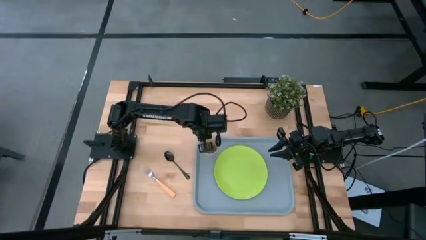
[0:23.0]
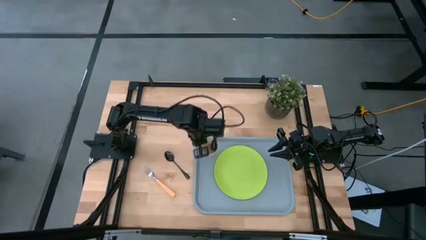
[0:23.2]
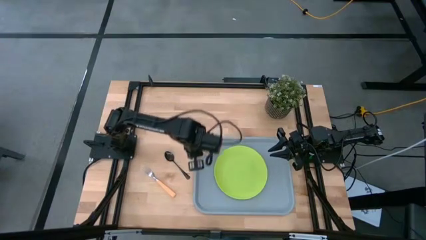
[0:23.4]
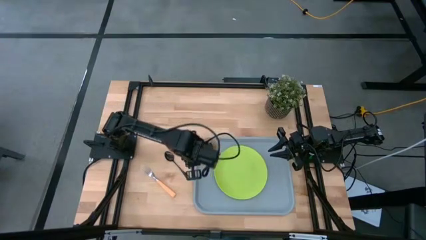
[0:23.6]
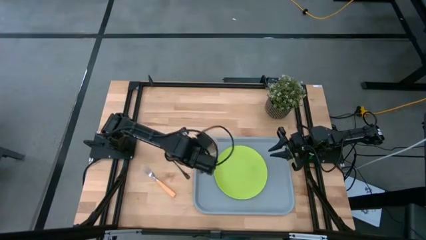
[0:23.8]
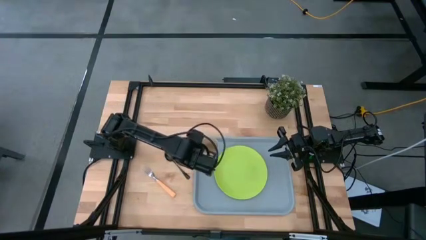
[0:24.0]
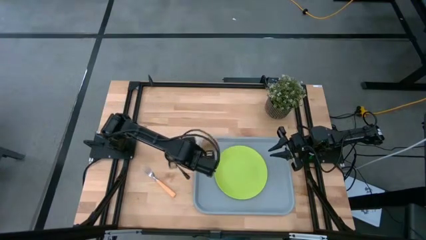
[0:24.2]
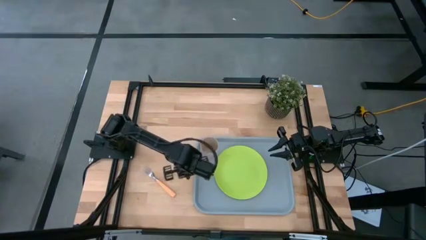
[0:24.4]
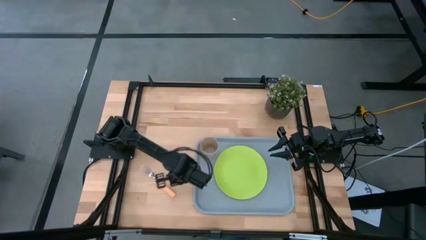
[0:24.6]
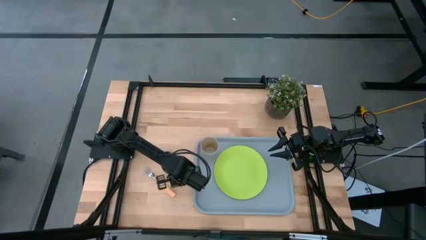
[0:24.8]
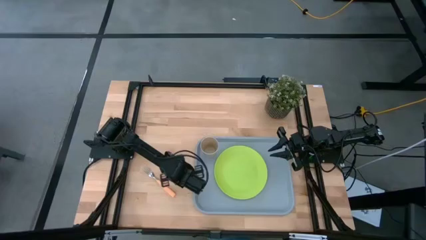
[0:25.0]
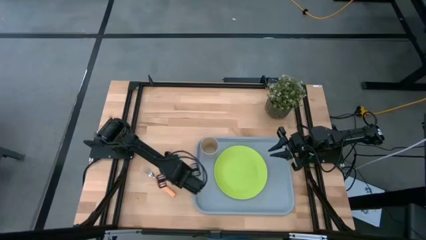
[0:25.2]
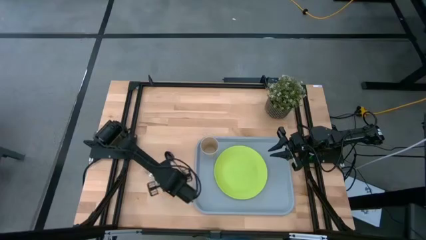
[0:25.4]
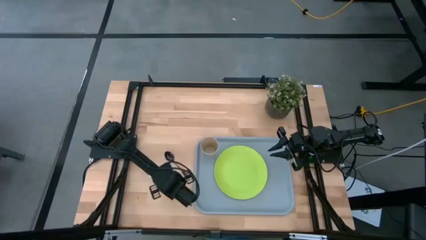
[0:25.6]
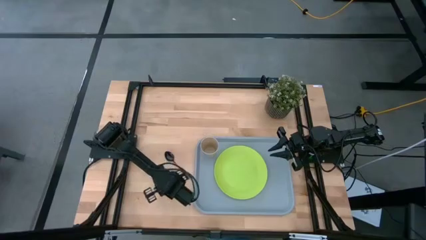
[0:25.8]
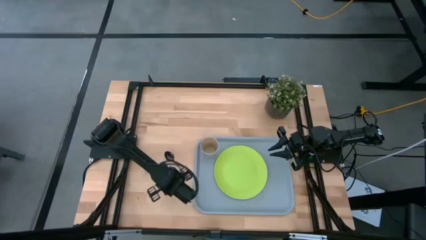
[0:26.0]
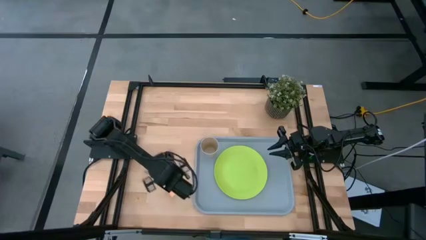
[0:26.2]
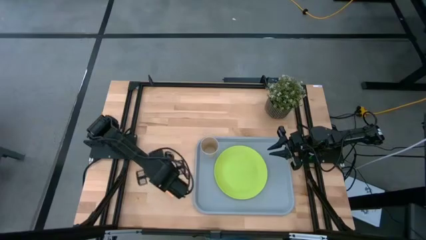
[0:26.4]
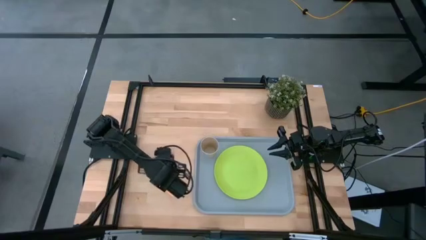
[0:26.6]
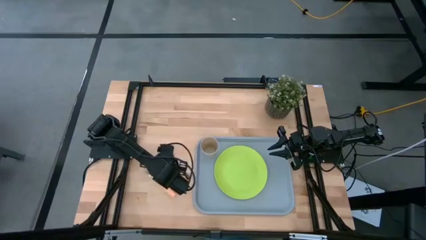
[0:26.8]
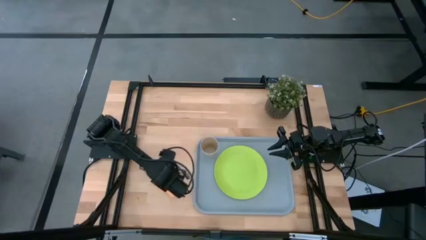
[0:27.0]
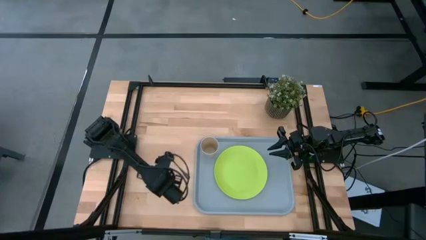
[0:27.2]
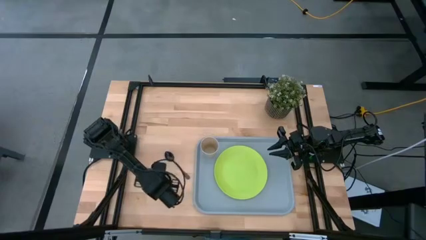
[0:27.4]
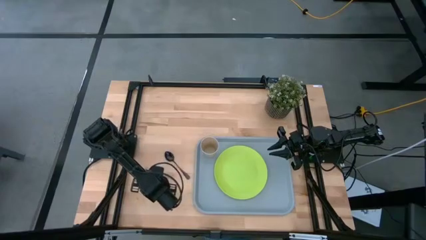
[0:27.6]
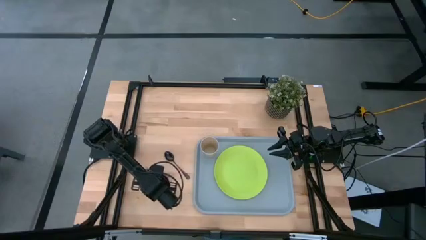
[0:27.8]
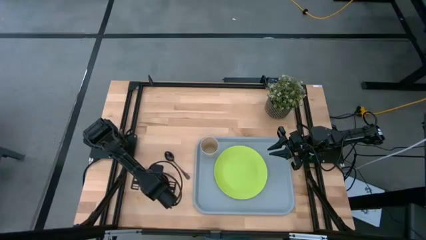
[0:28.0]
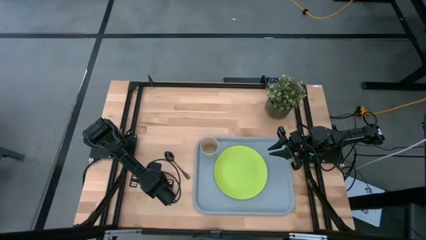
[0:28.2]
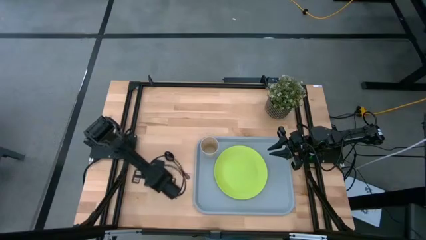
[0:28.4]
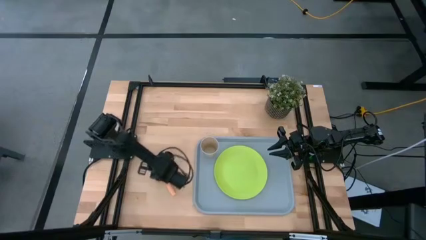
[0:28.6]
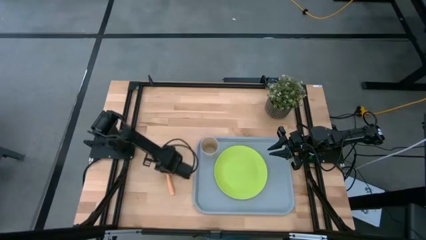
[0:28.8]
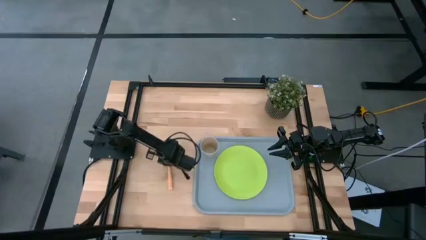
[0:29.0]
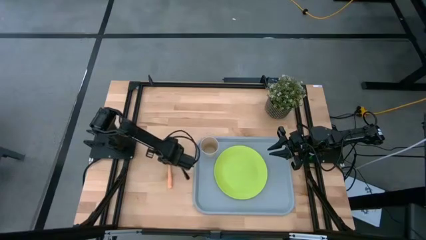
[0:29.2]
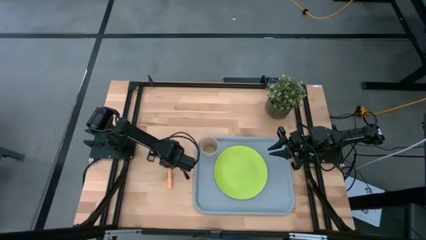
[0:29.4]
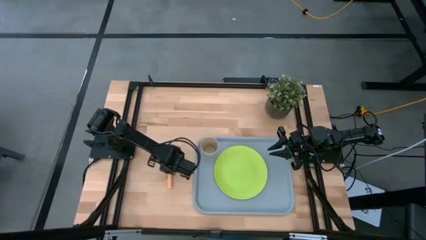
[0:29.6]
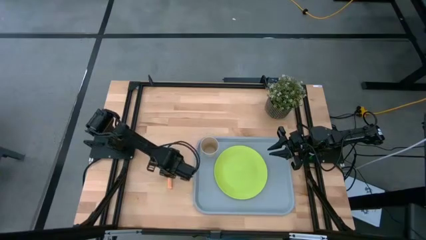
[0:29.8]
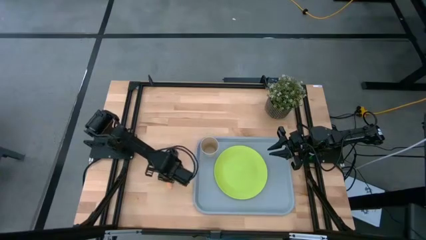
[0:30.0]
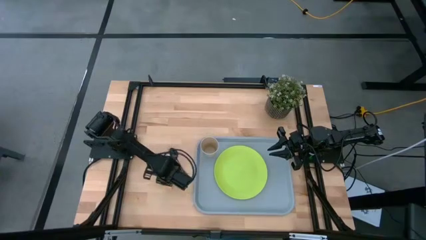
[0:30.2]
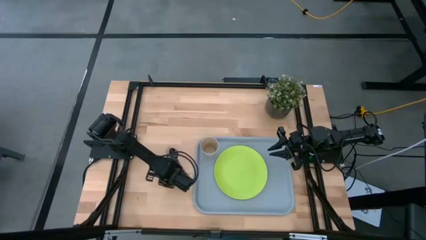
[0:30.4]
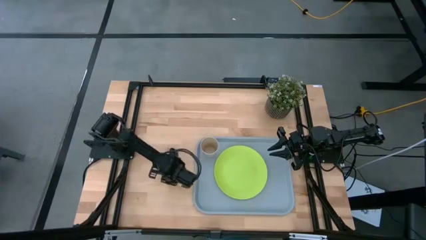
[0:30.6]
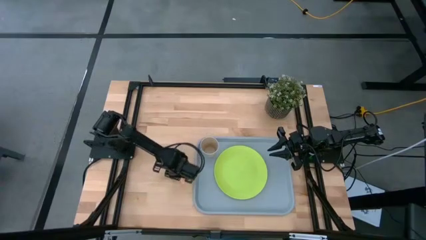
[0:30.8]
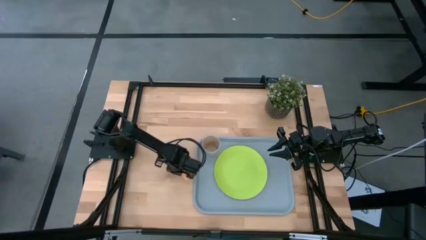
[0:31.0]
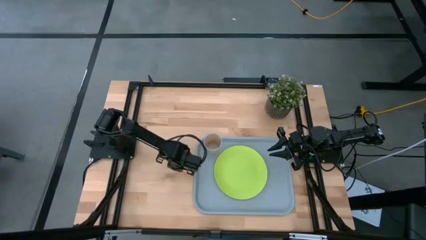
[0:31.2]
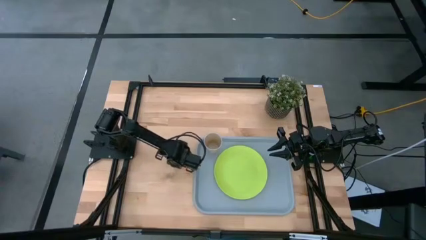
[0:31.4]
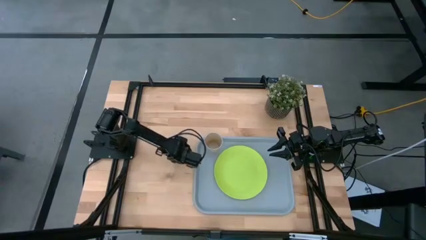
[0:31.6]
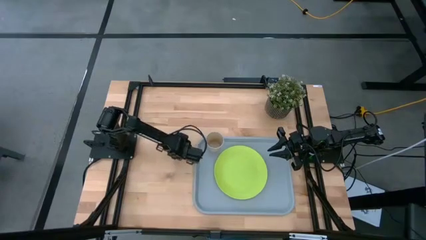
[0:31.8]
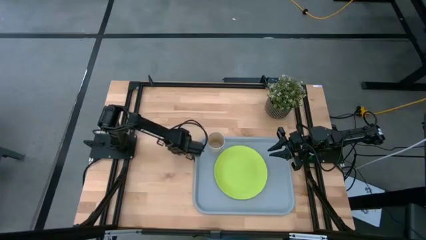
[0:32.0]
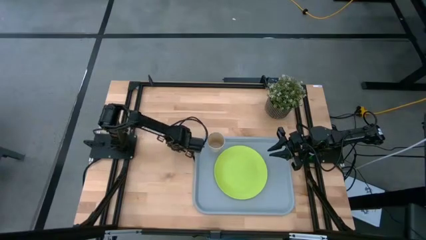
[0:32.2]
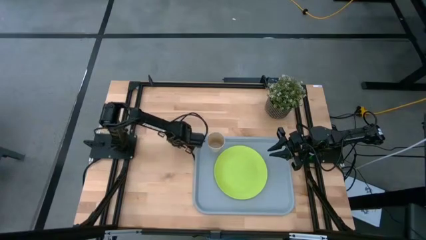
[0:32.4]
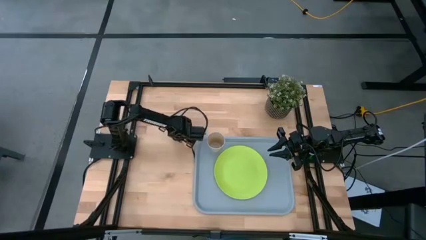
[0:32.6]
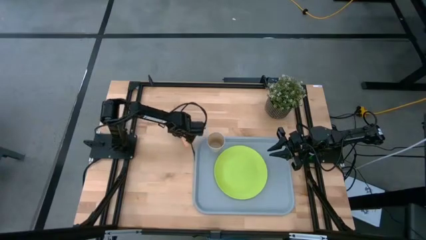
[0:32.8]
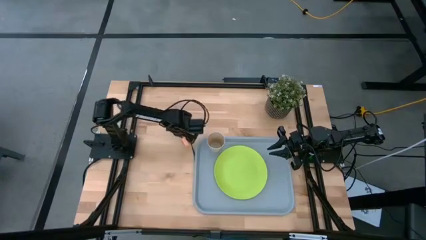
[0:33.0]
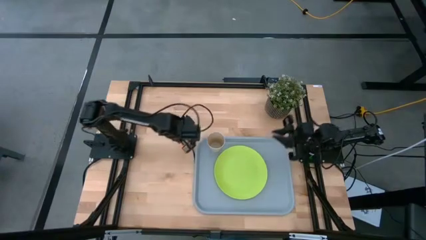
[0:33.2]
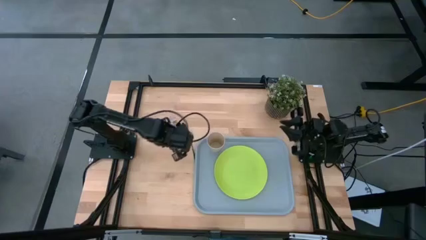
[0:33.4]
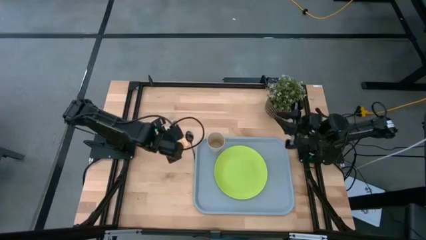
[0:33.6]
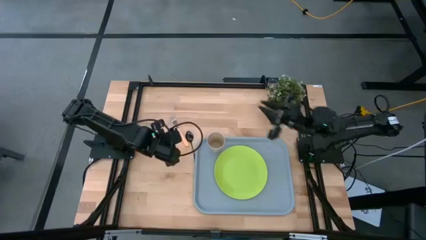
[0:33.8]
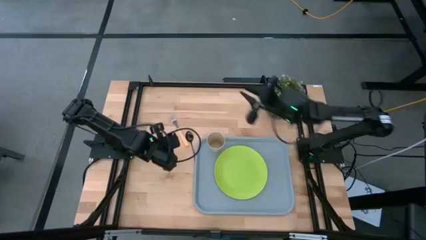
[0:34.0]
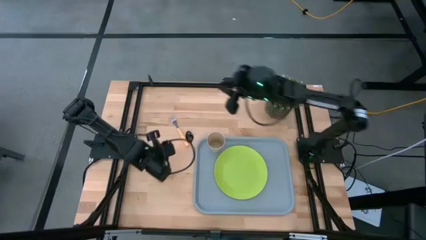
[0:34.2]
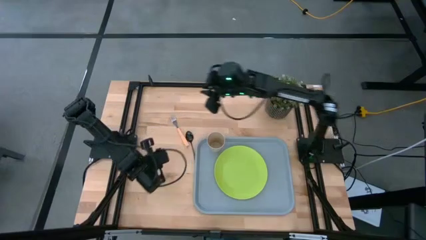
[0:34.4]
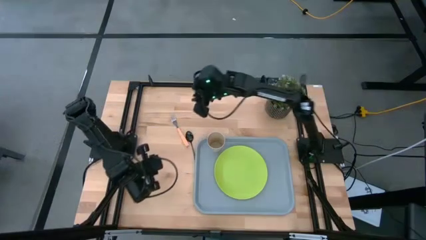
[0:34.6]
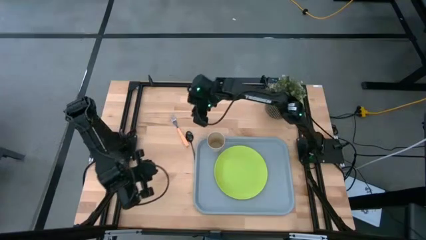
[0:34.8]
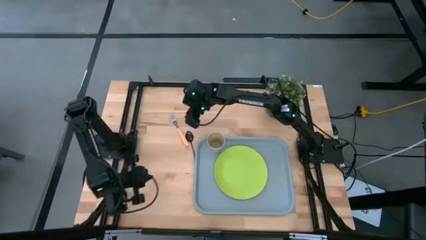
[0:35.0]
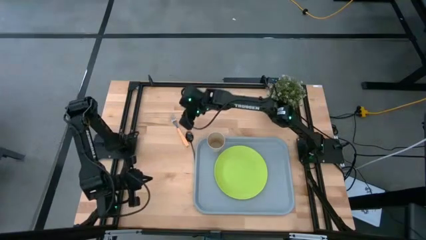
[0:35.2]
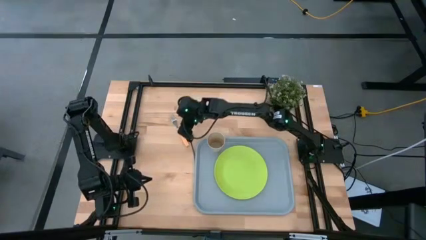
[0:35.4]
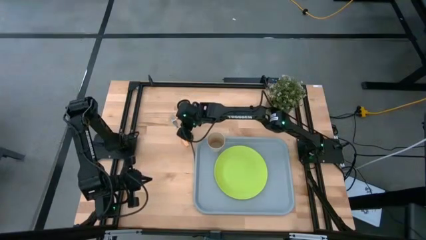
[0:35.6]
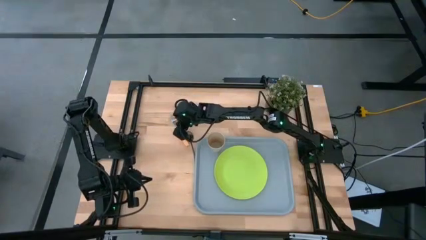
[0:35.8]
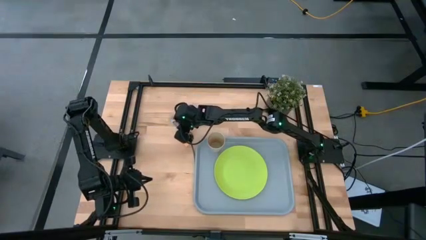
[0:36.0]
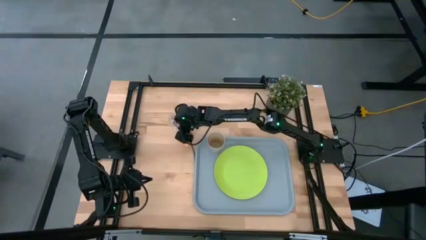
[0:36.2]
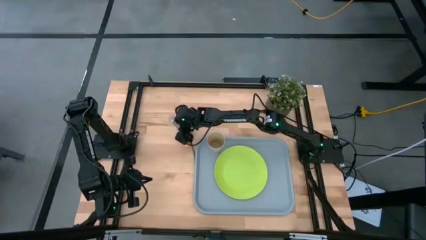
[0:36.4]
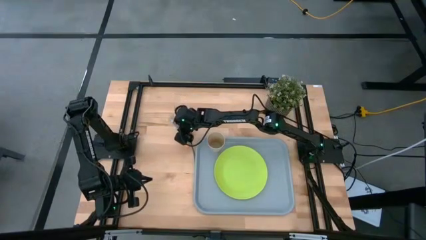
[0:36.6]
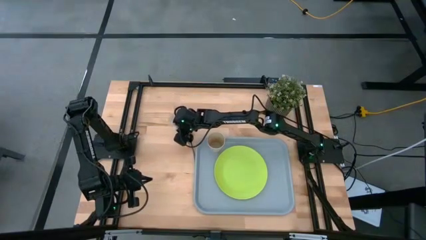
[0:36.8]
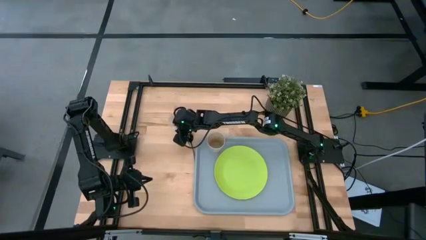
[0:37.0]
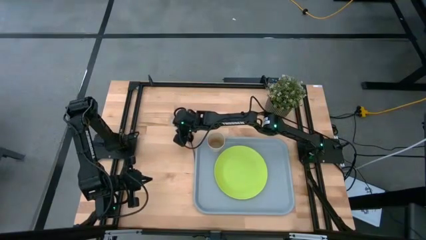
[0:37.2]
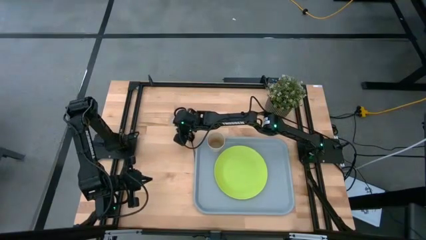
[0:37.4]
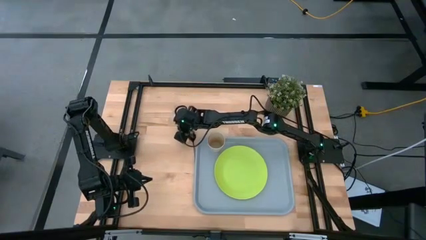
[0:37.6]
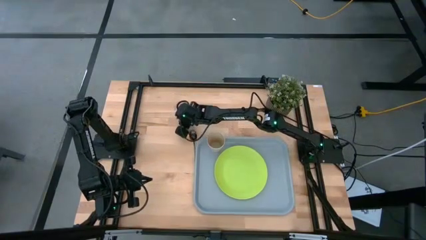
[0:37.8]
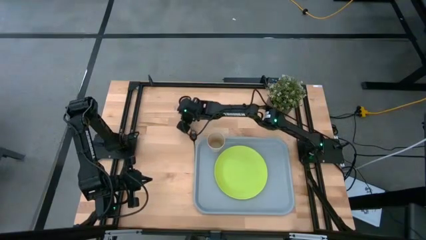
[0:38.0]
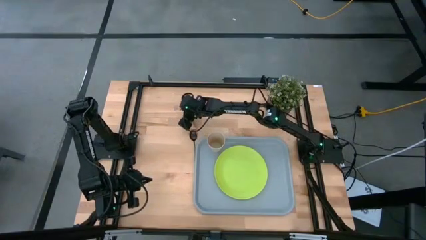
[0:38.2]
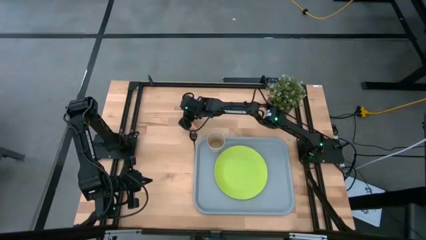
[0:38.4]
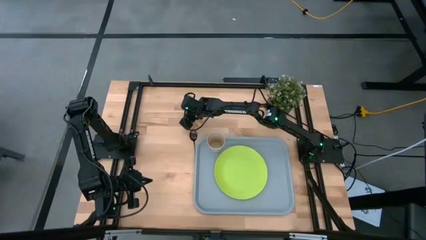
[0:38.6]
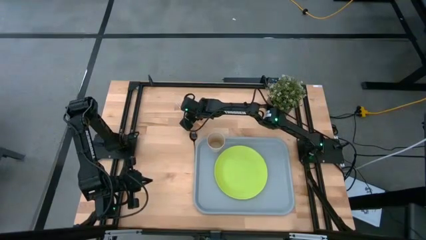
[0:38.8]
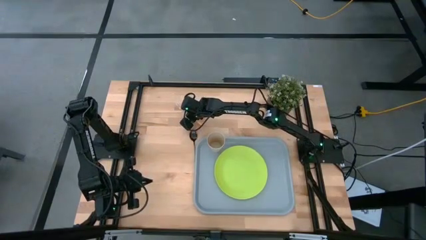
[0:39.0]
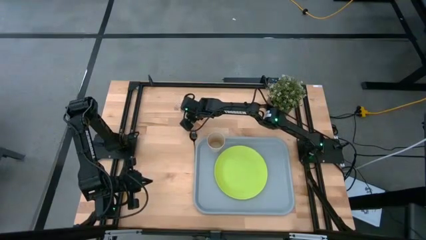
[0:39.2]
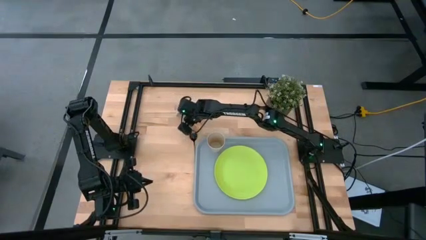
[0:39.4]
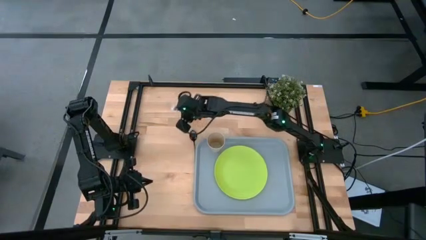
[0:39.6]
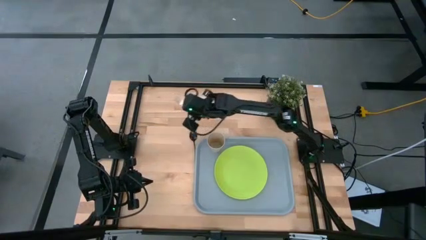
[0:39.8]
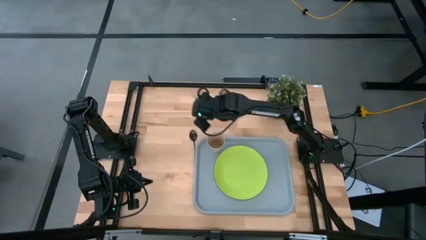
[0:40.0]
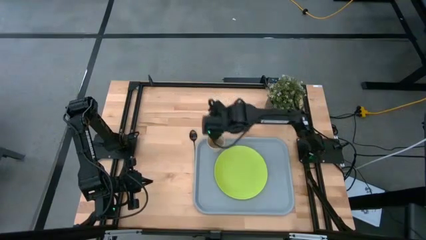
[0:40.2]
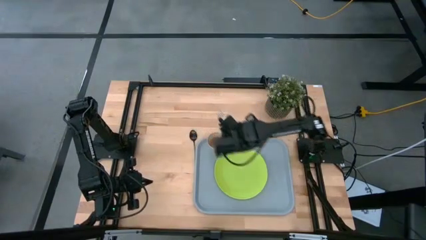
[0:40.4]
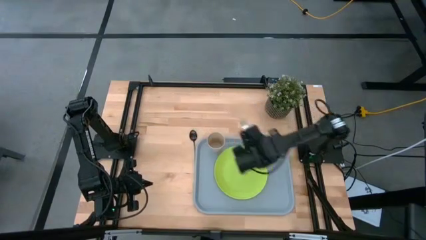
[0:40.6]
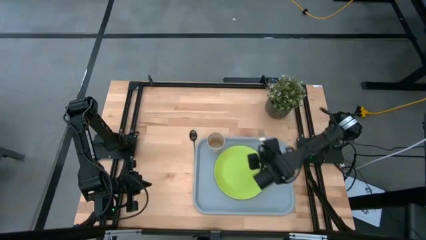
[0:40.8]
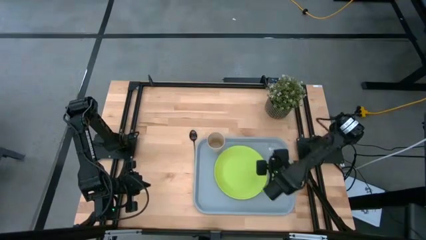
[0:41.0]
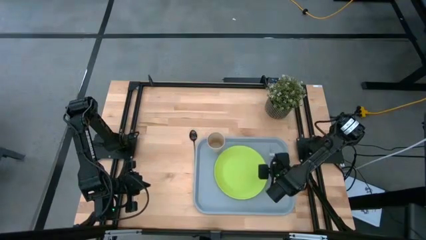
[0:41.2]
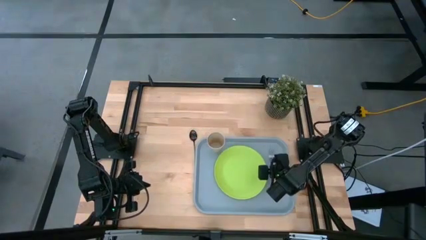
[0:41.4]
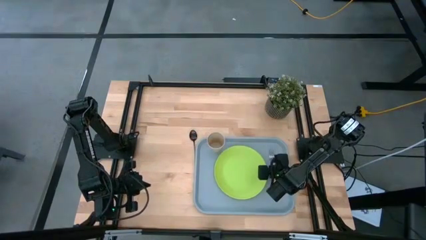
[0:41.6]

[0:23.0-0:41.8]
Task: Pick and place plate/cup/fork/spoon on tray
Put the orange fork on the gray serving tray to the right side of the green serving tray
